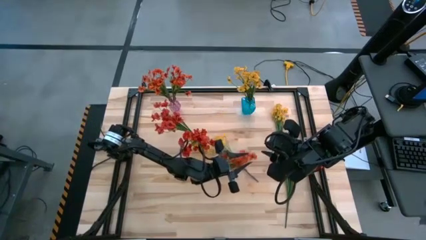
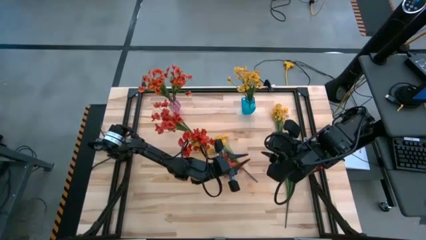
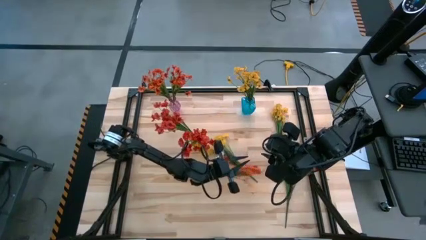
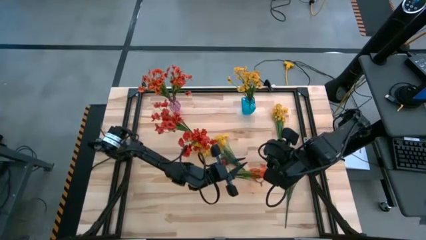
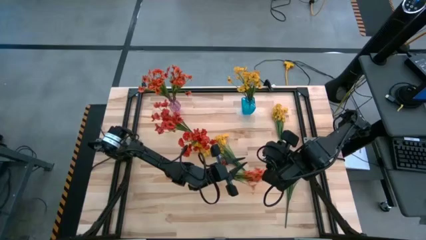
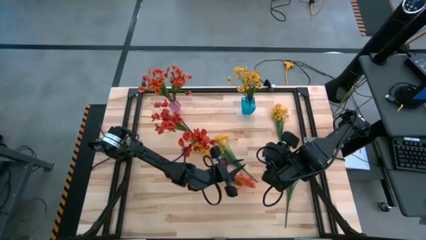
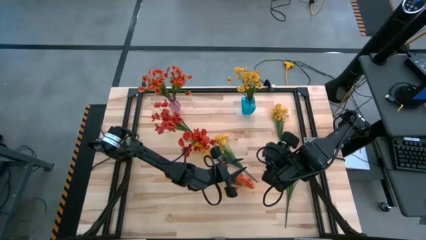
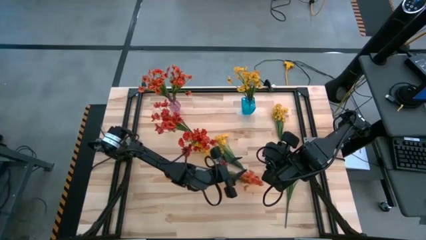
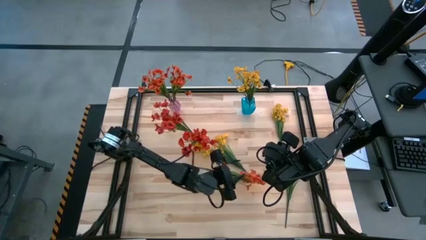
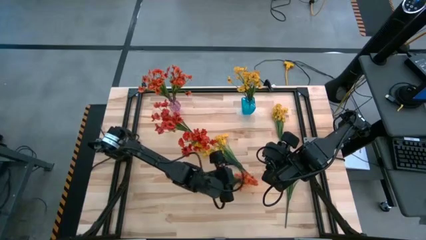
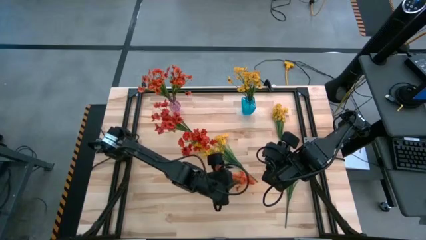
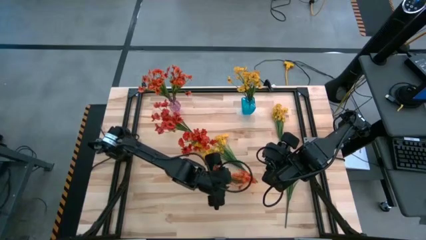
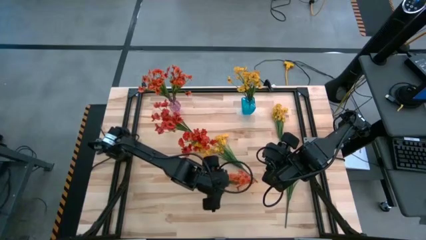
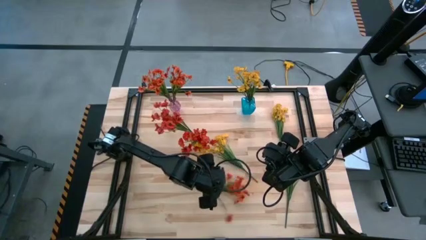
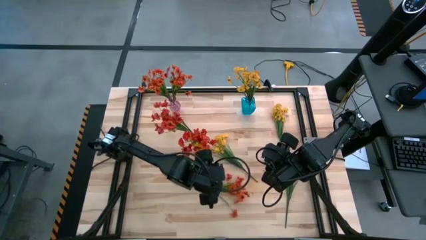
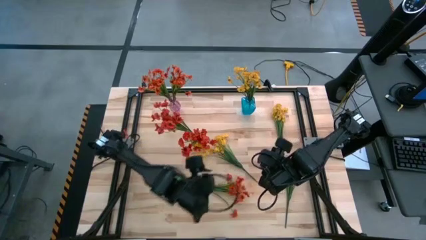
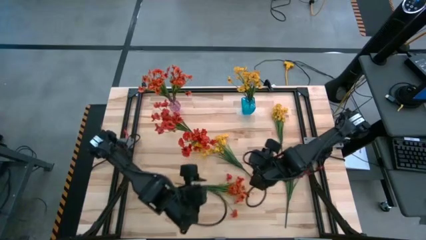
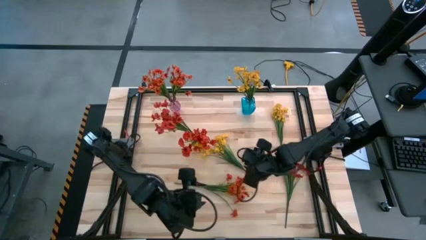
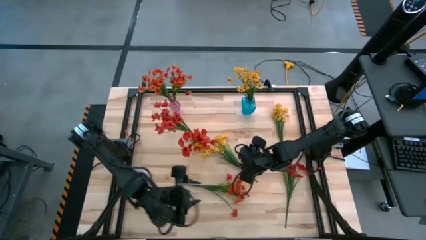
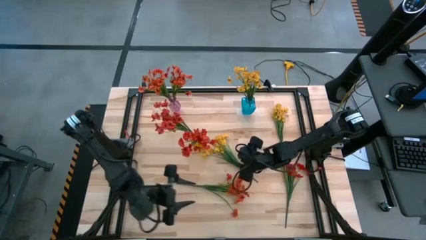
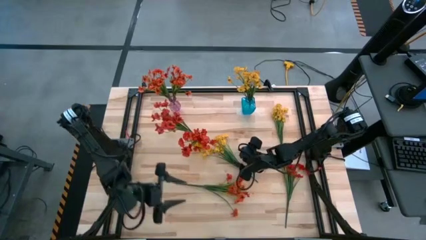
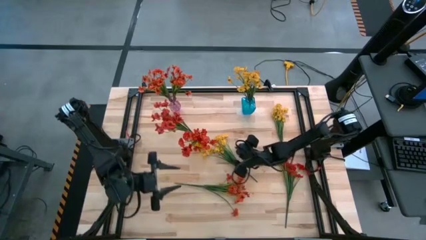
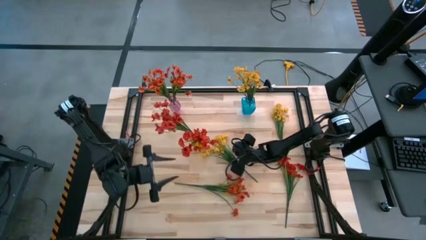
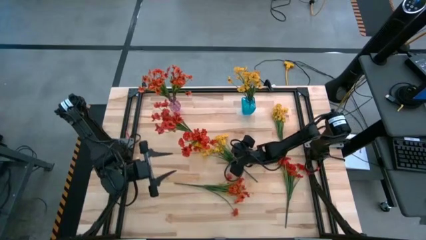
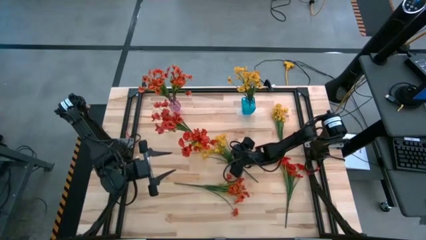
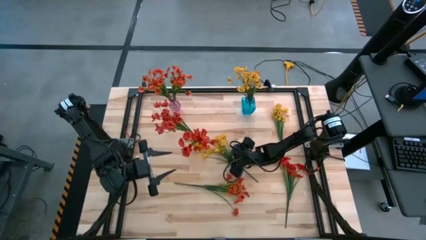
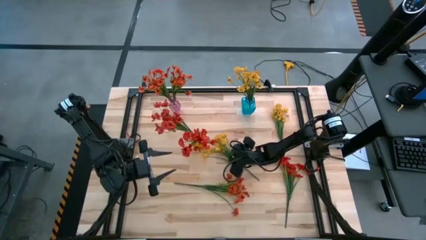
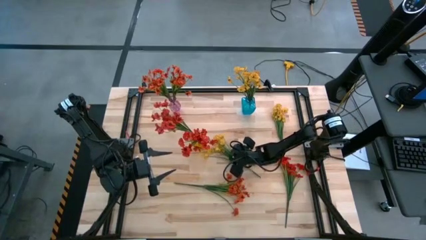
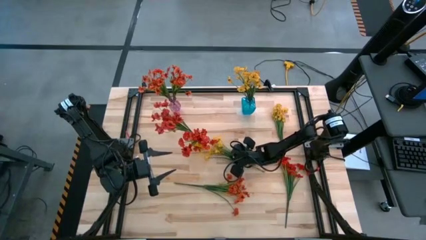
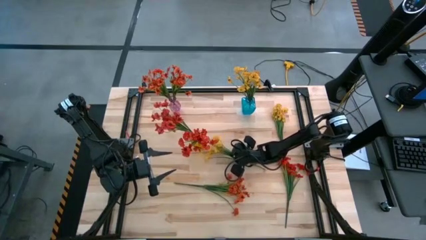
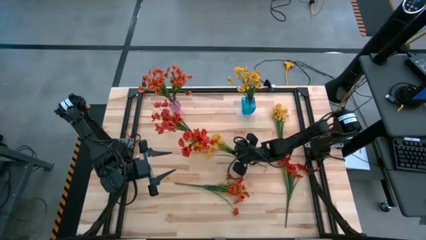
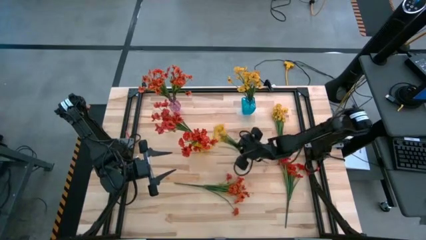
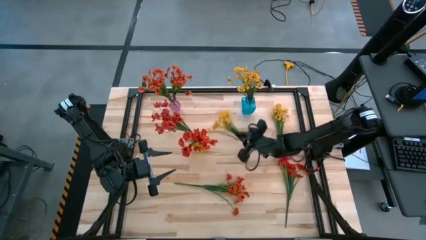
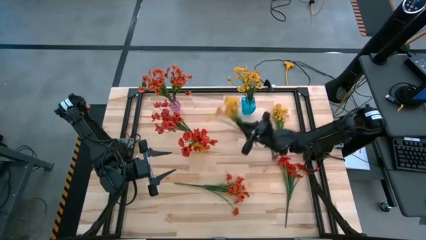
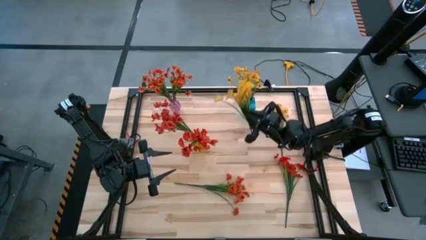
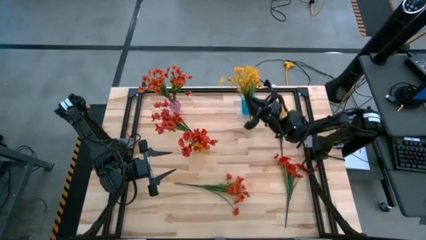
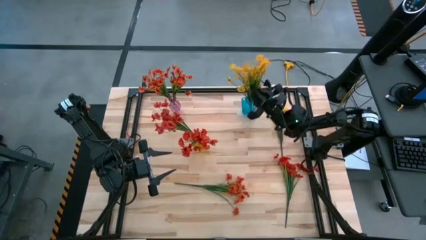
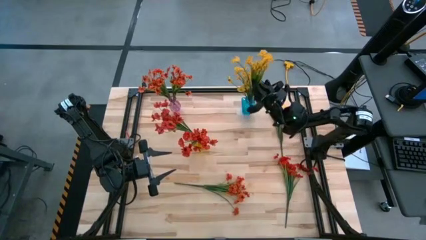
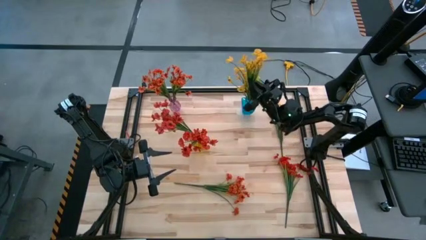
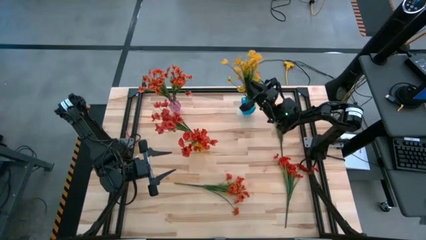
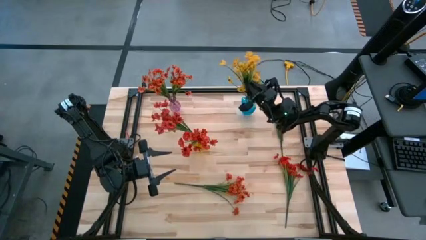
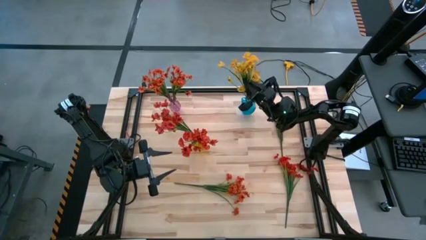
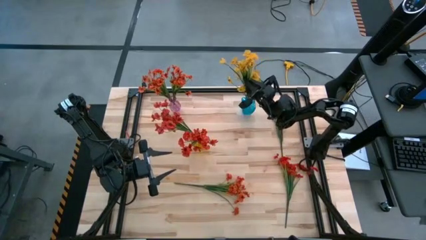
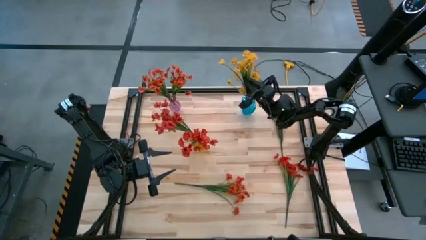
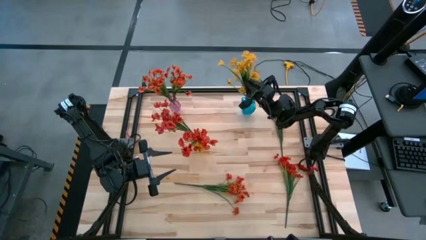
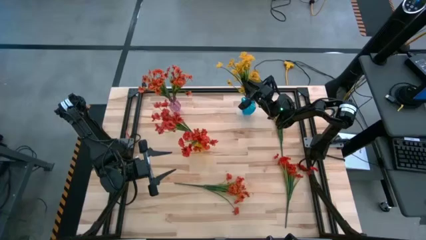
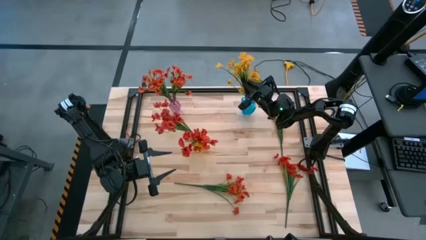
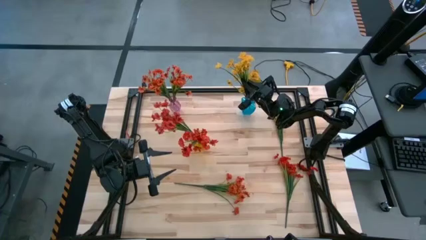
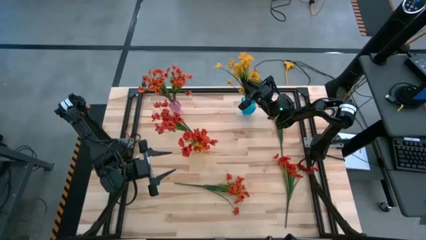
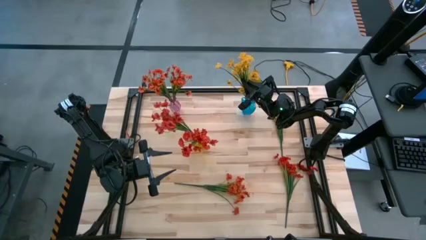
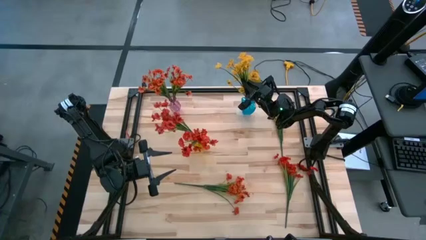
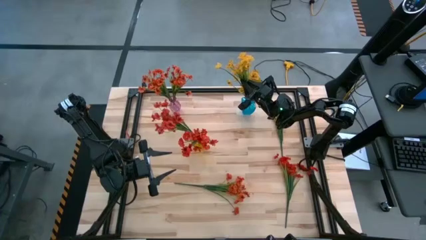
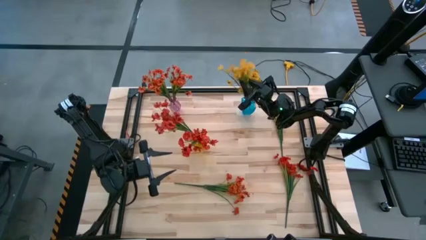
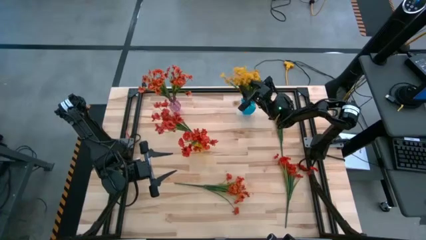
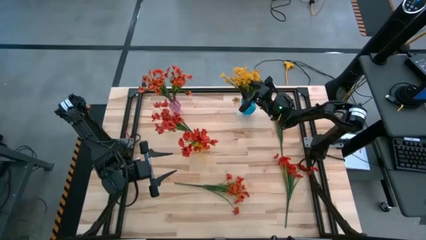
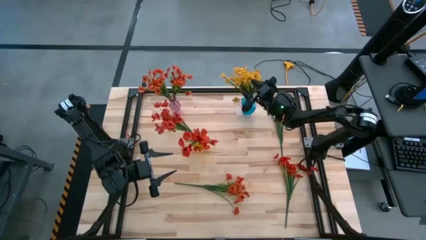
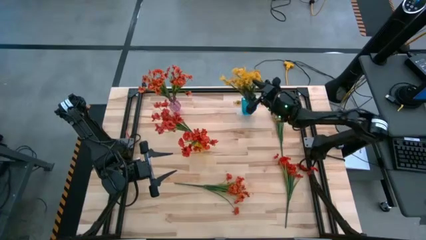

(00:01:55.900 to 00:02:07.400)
Task: Sort flowers into vase by color
Put the left yellow flower into the blue vase

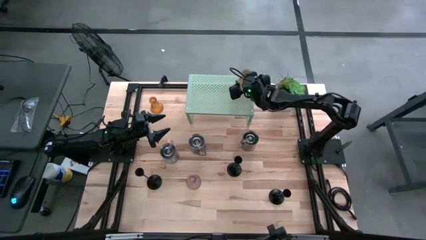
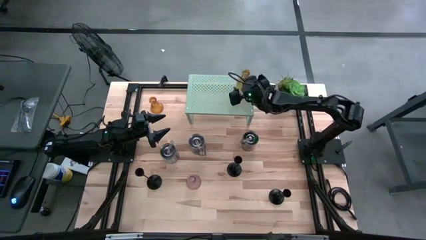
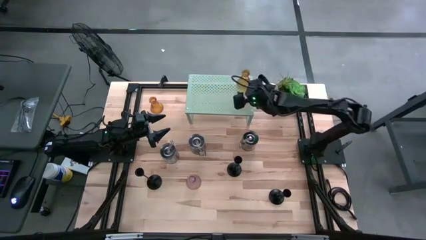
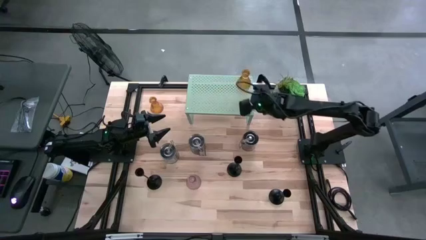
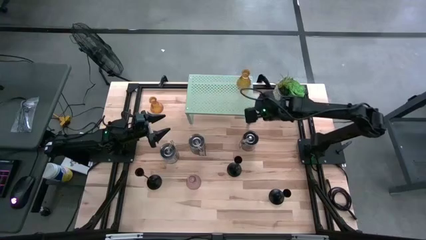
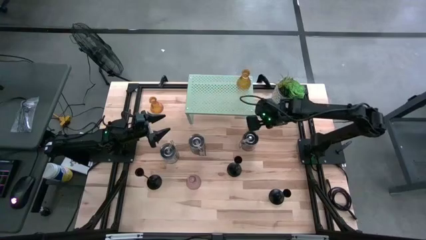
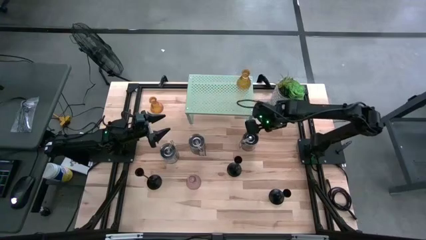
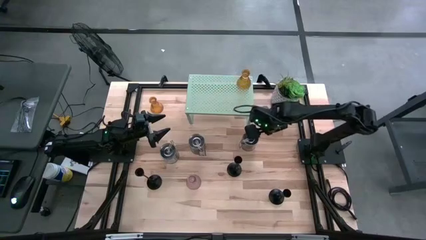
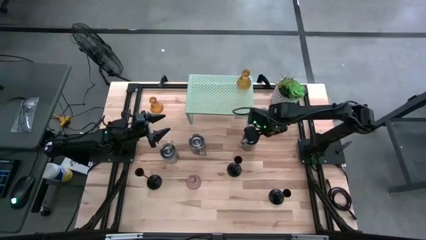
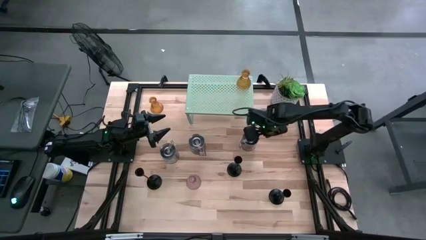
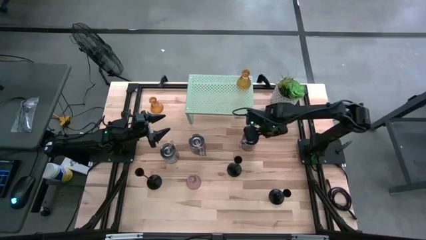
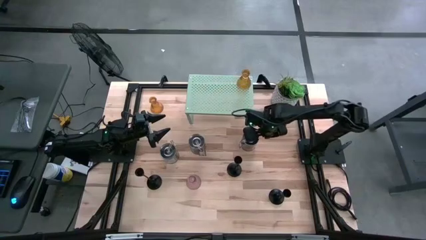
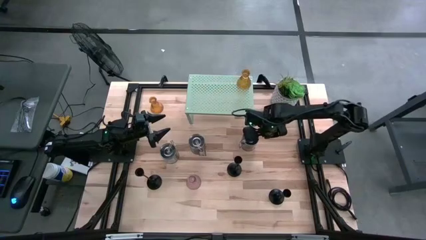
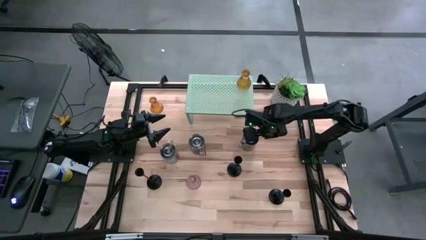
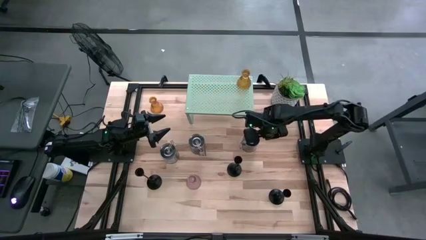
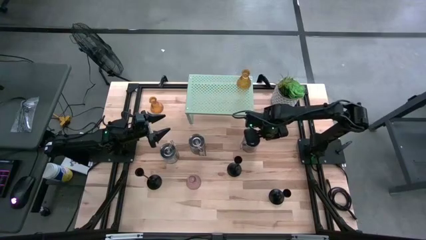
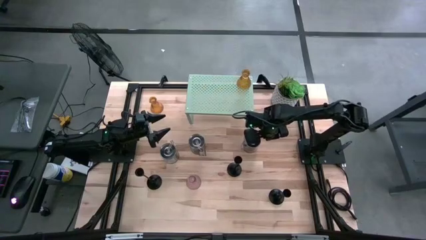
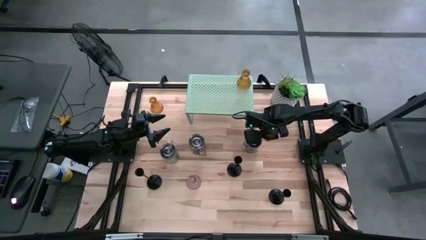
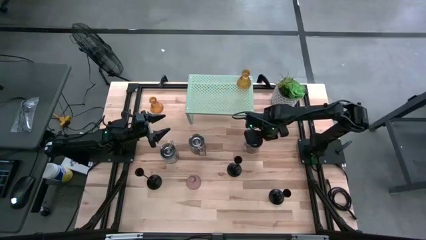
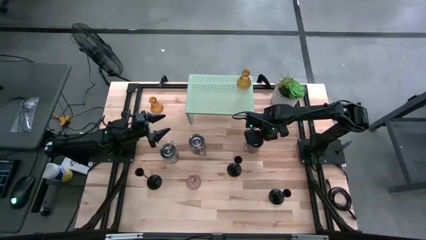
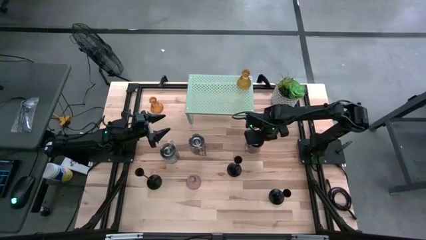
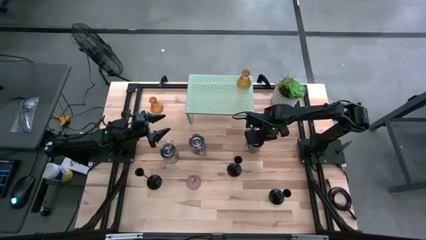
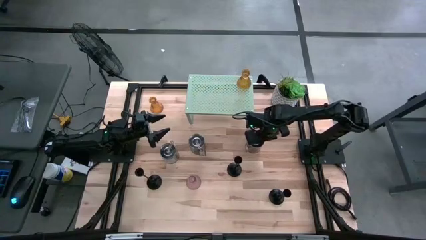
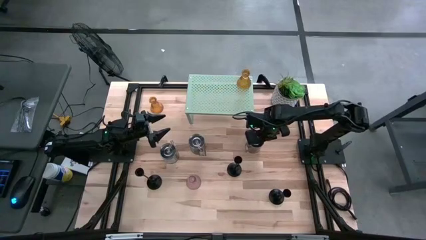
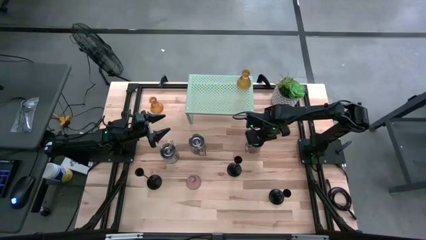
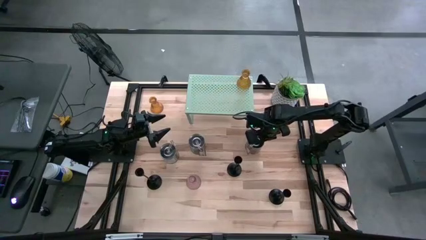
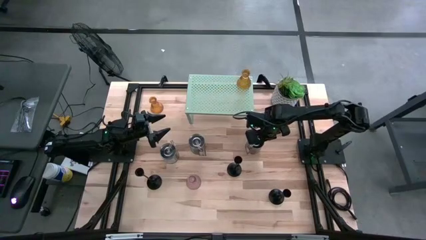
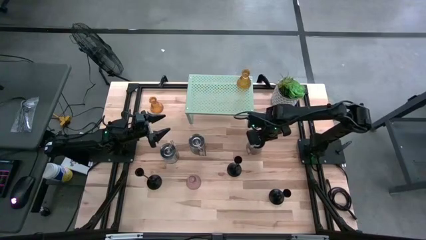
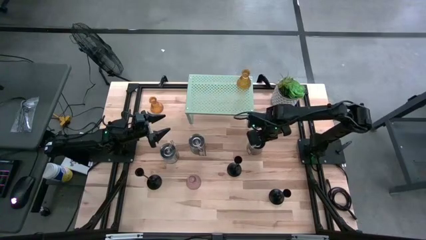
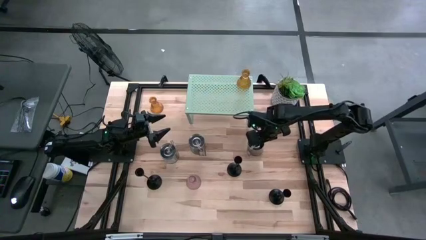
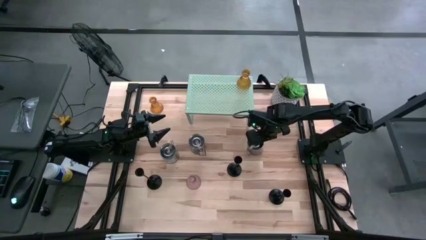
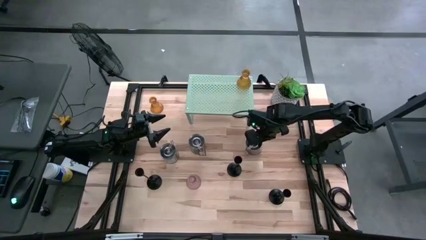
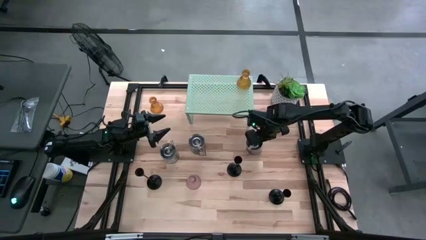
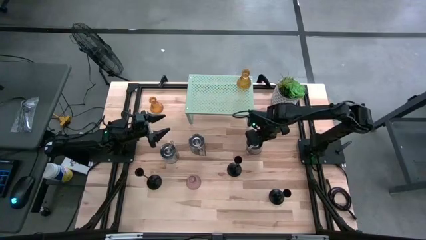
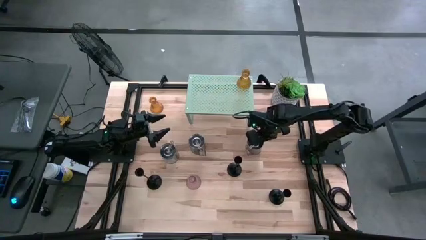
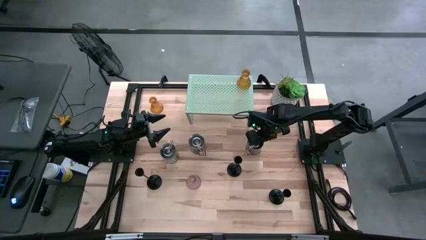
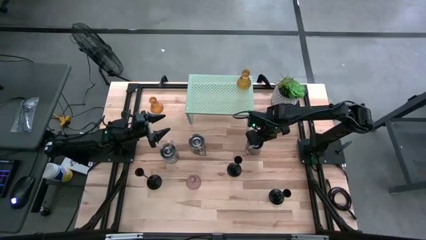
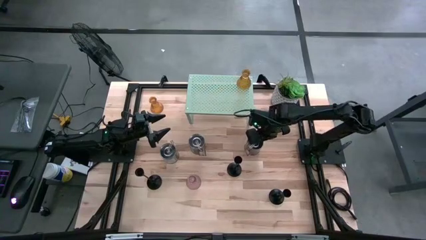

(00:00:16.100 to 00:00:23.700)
Task: Pick & Place candle stick holders
Put the orange scented candle on the shelf
